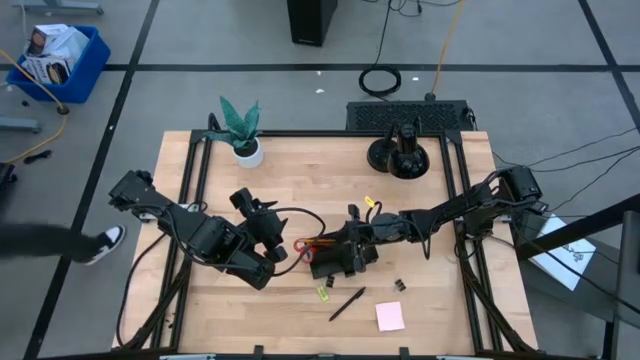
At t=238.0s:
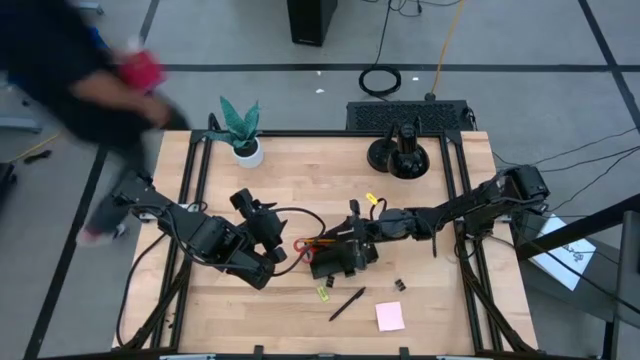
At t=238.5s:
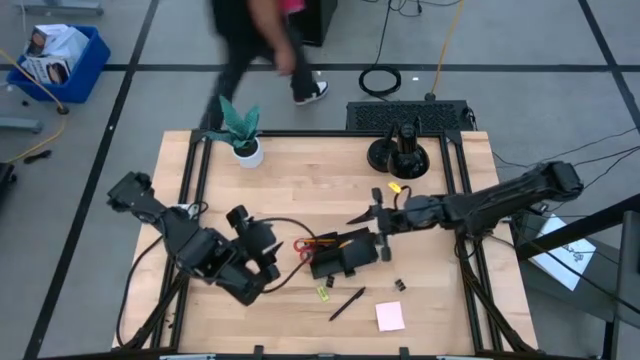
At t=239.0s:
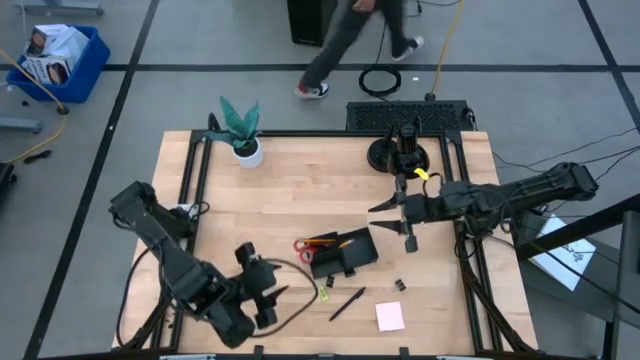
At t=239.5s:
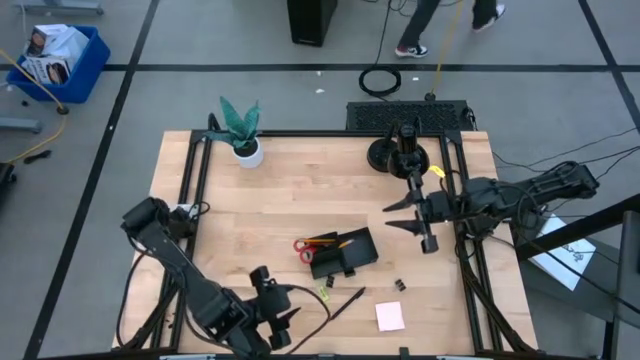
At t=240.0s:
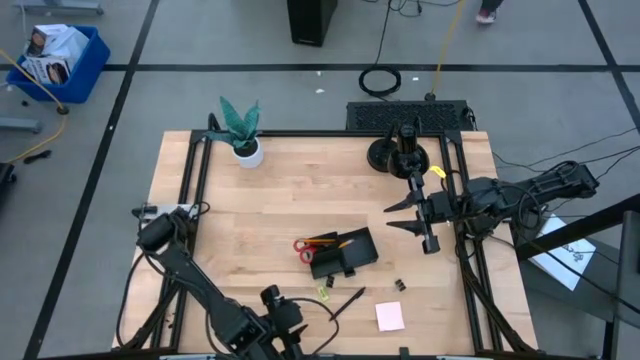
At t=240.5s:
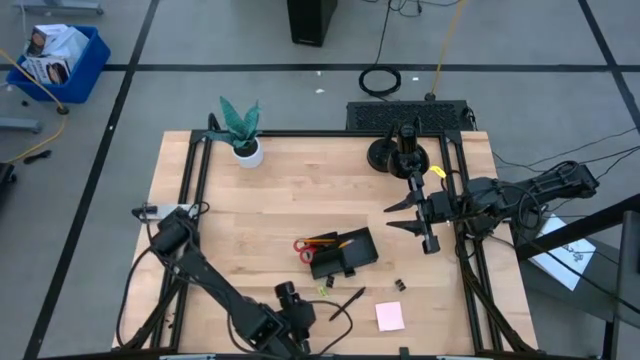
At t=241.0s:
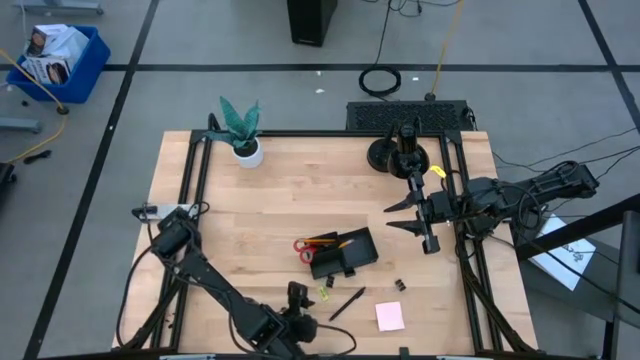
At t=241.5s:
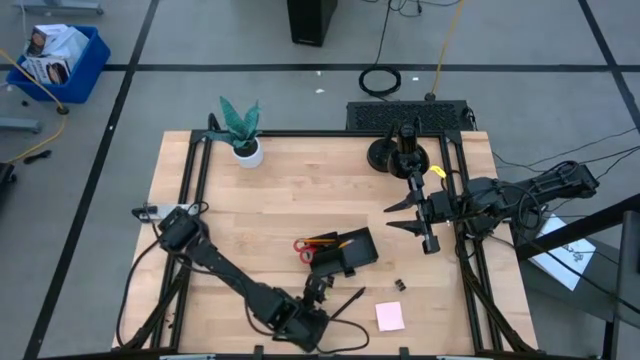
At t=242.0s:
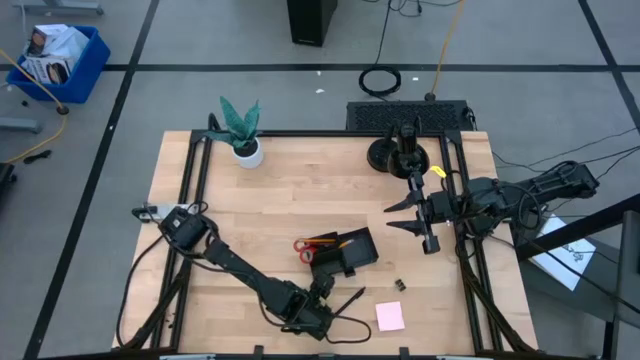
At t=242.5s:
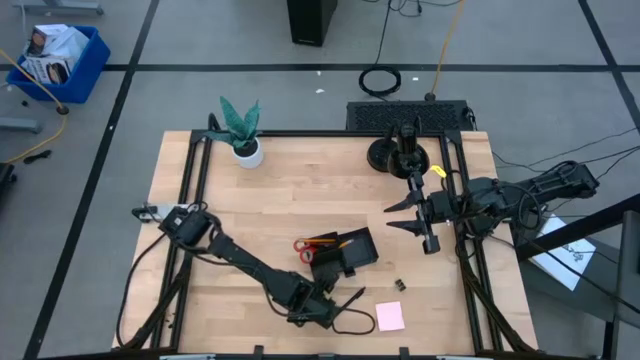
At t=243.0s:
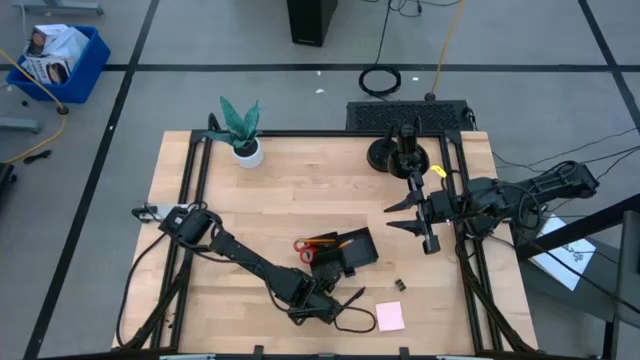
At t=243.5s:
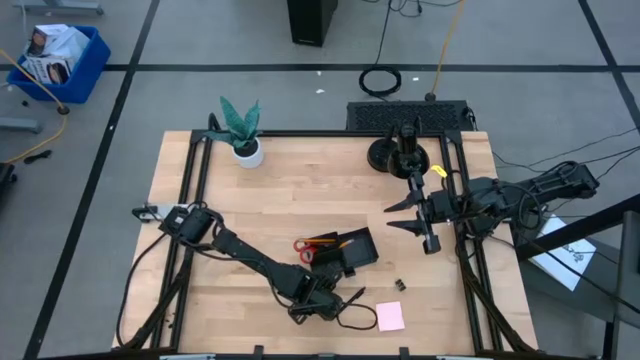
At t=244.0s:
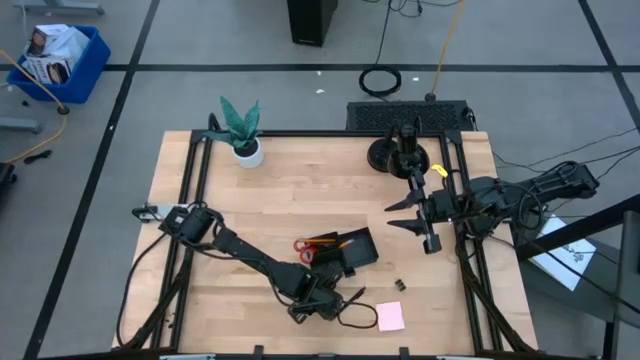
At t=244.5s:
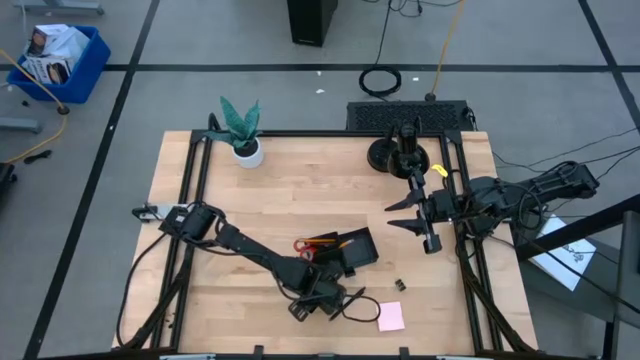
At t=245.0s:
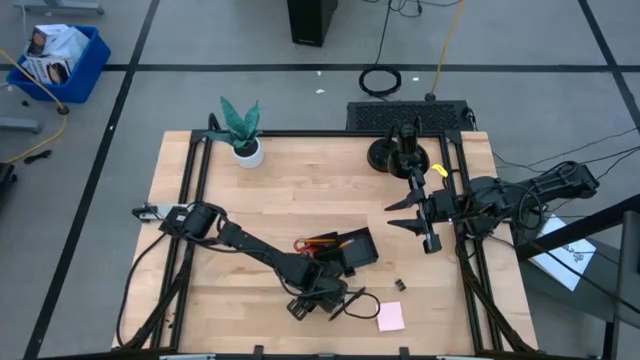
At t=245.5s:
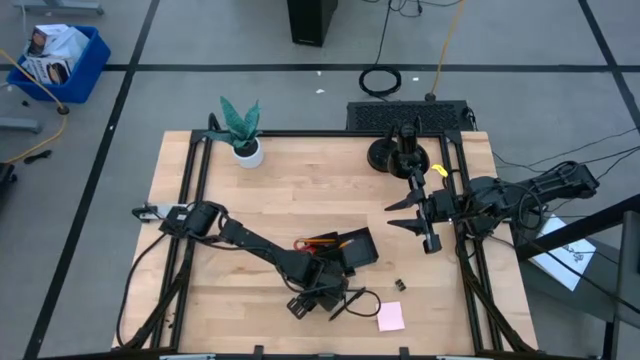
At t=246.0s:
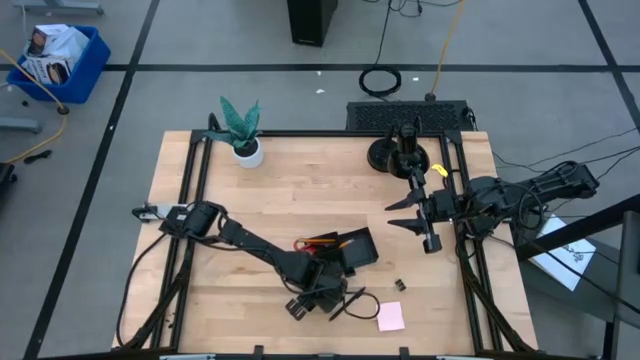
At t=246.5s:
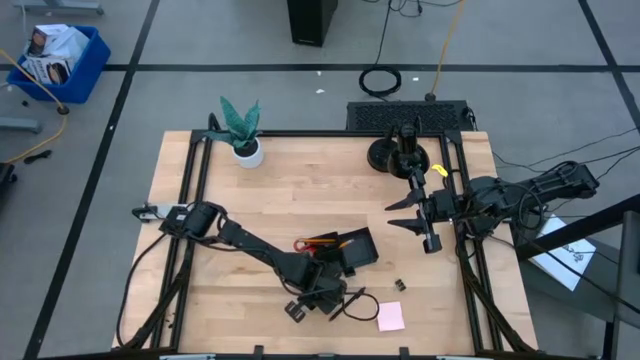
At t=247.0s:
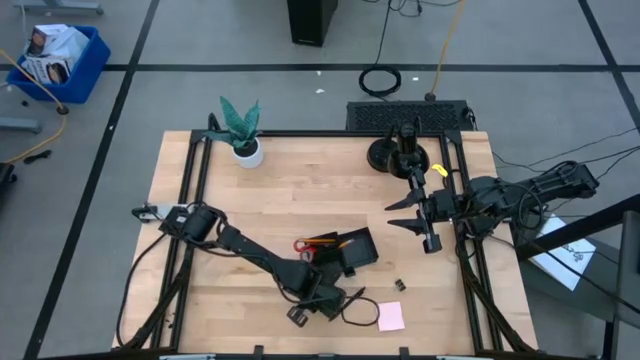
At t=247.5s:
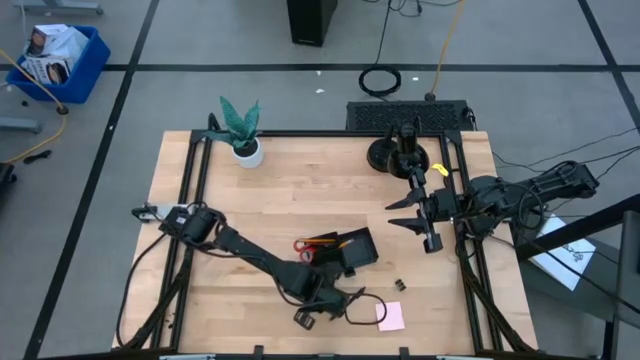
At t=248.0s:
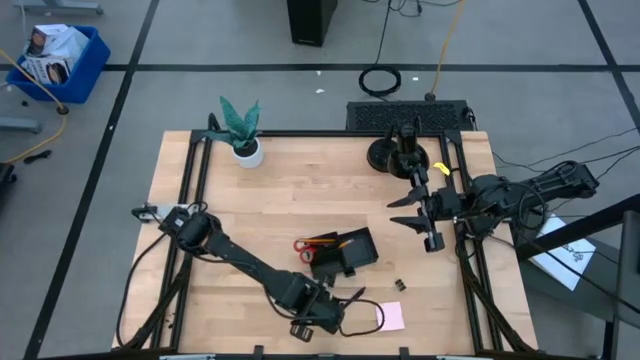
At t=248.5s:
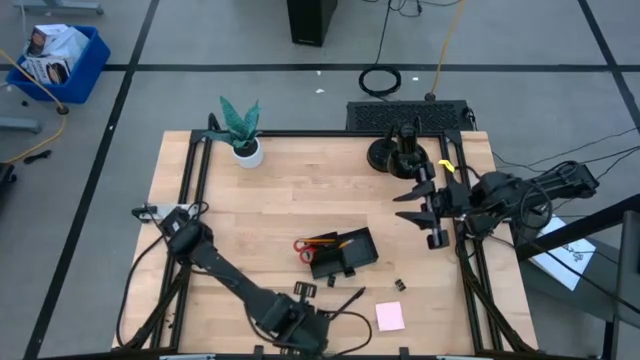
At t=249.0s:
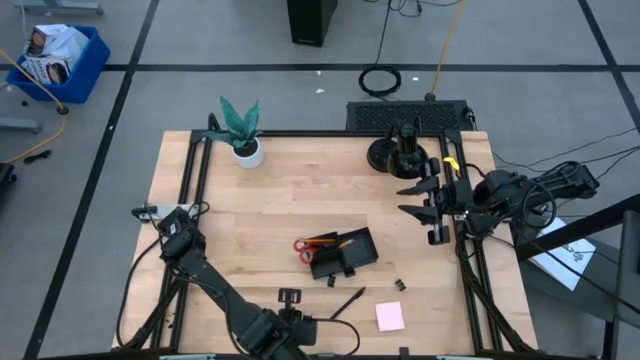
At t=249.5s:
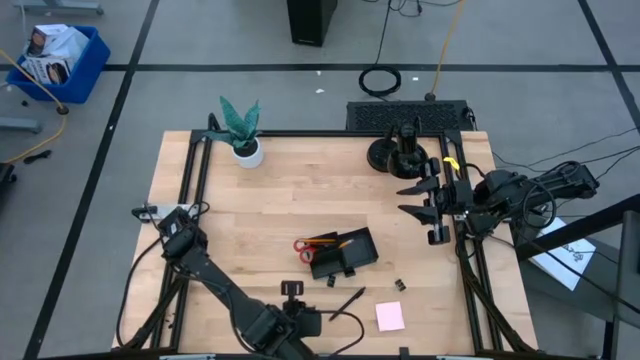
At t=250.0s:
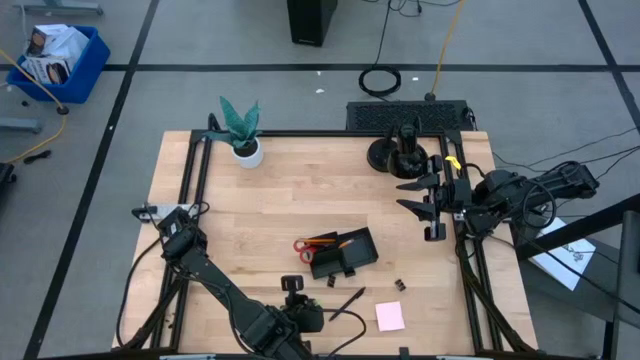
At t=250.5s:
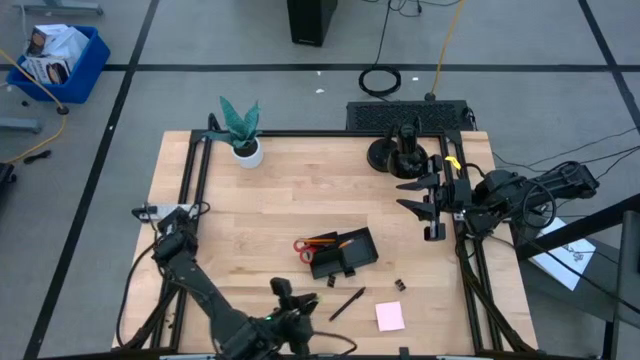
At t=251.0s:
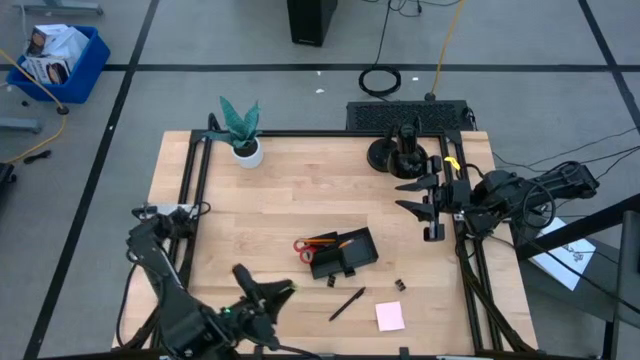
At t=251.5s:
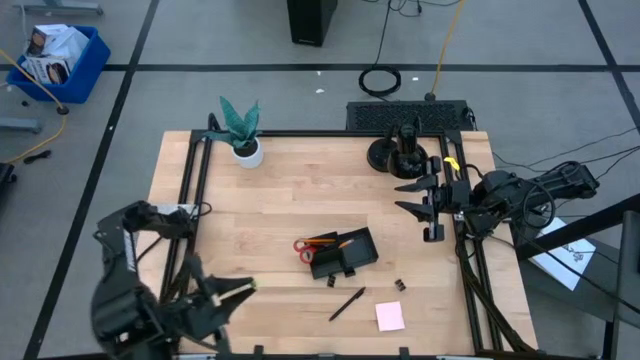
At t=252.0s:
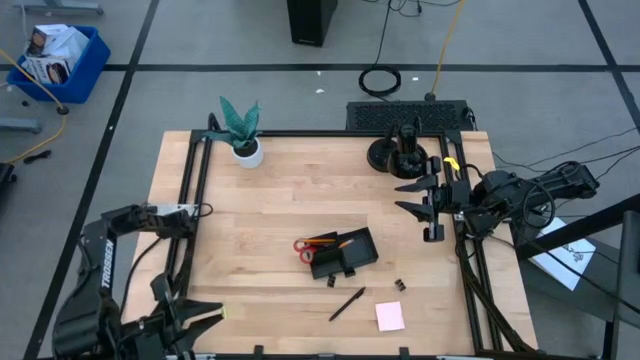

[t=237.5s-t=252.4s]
Task: Pick and place office supplies into organizer
Put the green eraser into the black desk organizer

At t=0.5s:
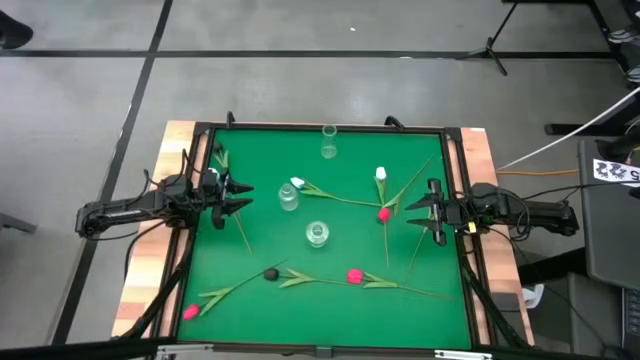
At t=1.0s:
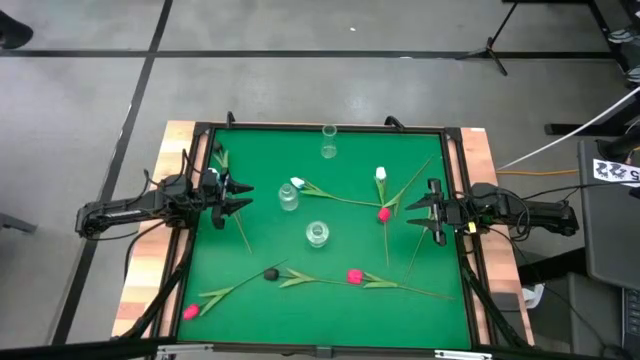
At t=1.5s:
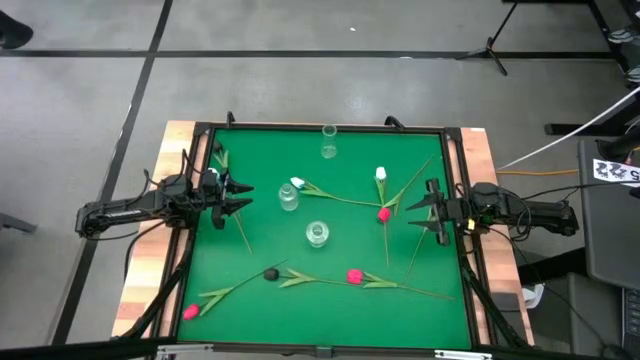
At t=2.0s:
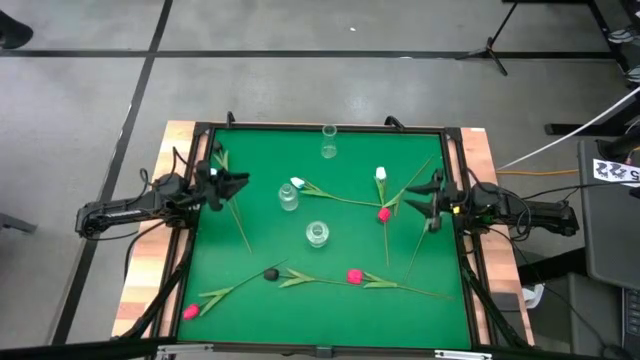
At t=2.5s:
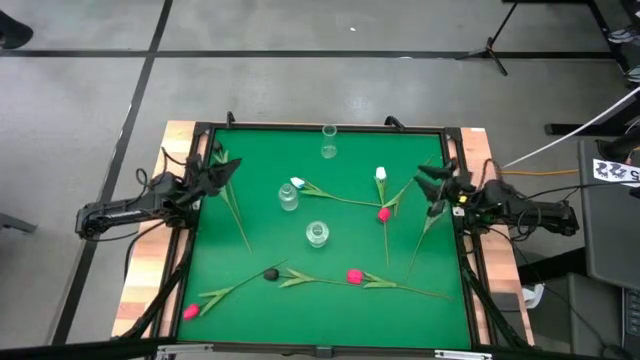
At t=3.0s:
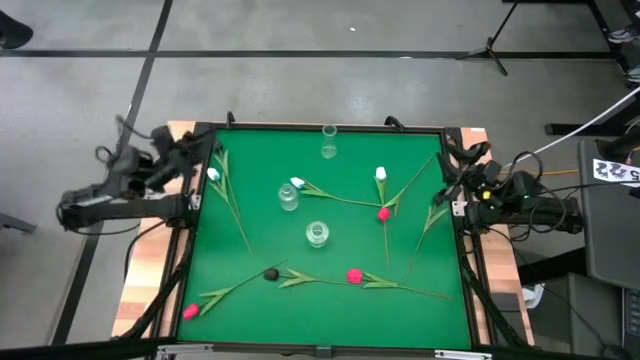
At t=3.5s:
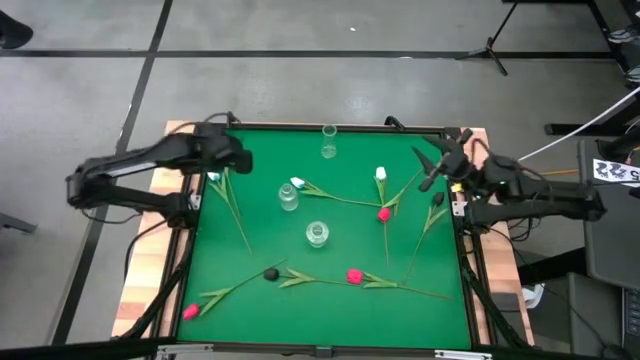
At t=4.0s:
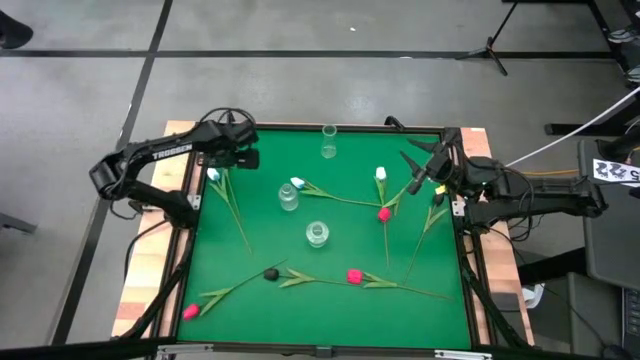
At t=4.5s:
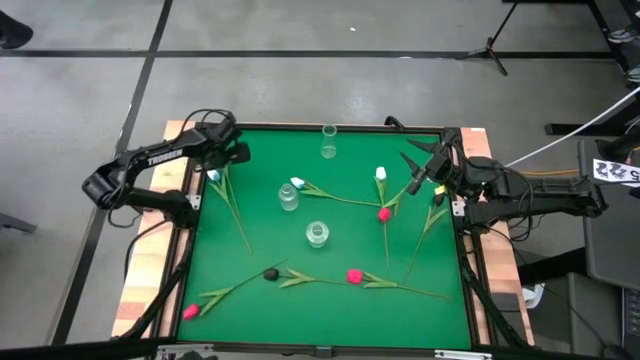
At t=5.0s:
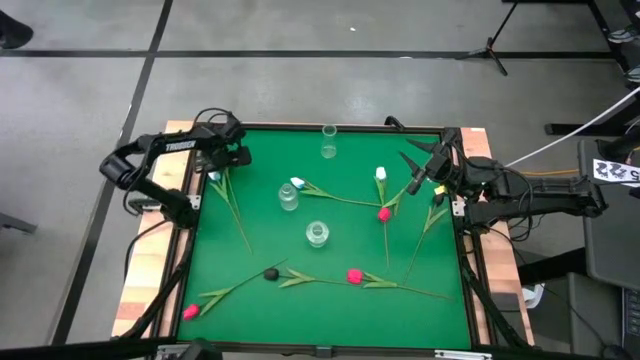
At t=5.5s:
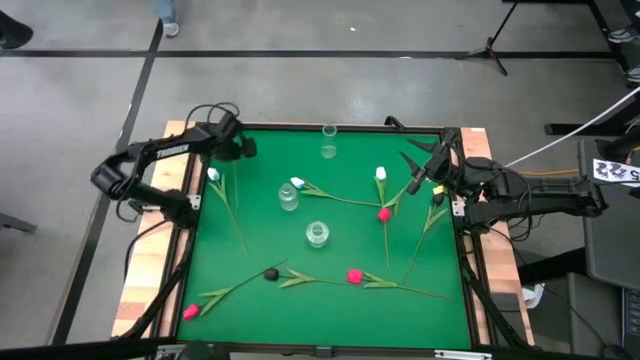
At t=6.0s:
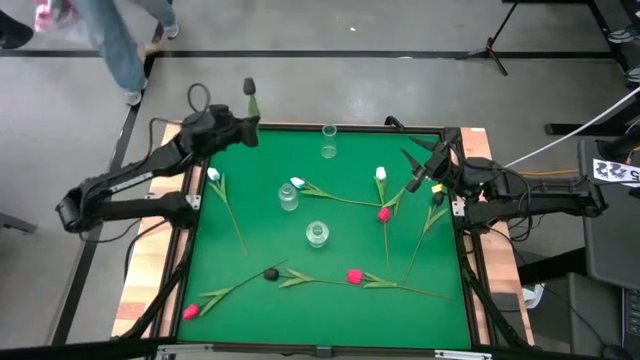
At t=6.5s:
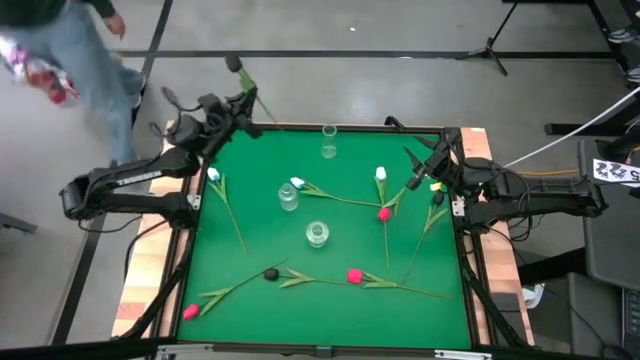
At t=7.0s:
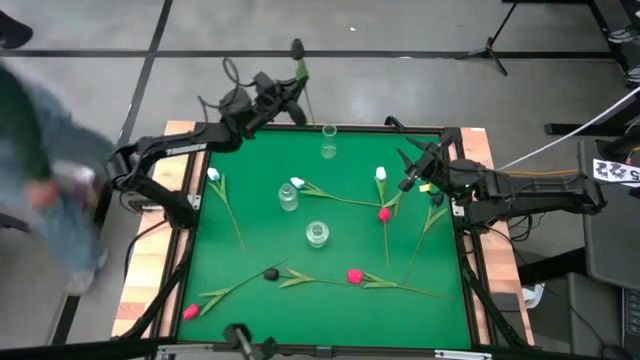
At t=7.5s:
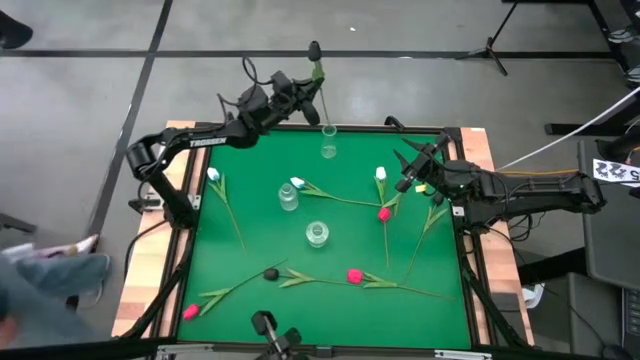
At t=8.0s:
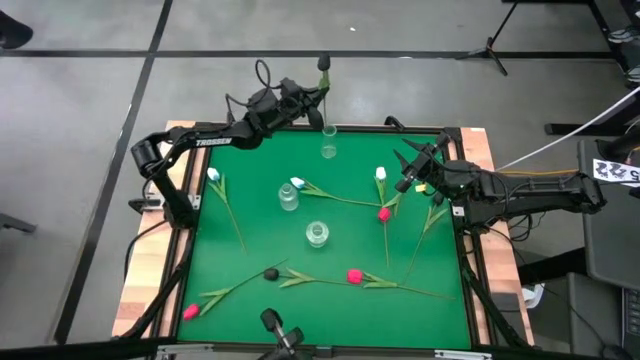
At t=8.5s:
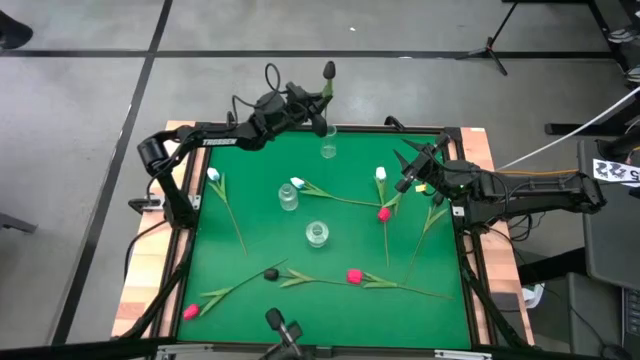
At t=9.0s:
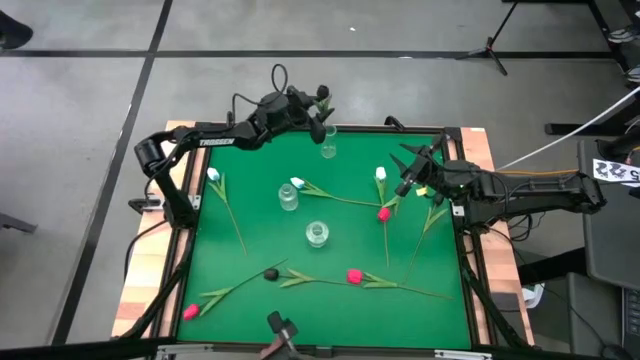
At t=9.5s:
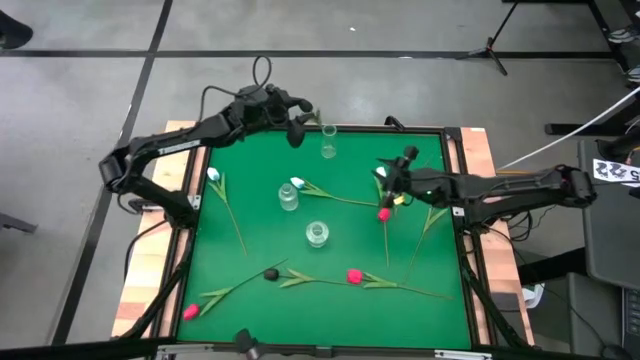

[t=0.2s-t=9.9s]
Task: Sort flowers into vase by color
Put the top left black flower into the top transparent vase
